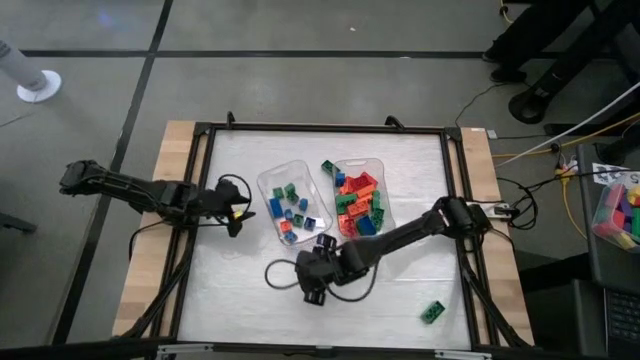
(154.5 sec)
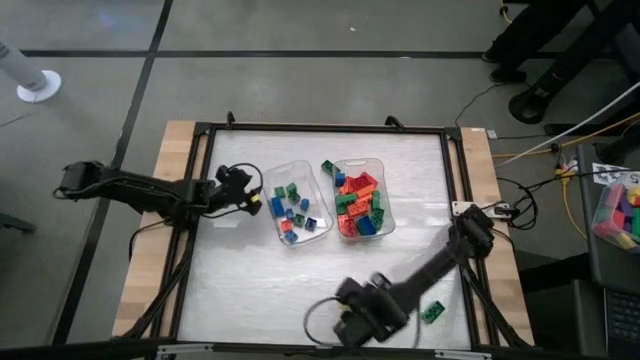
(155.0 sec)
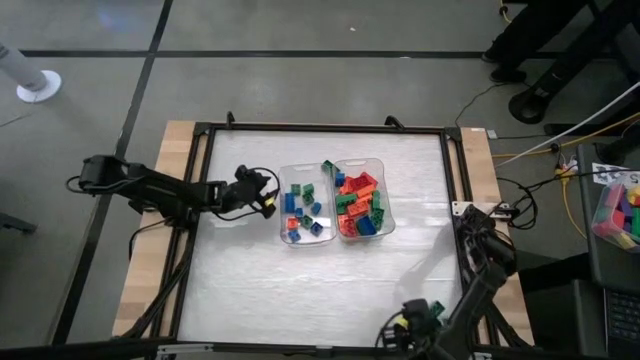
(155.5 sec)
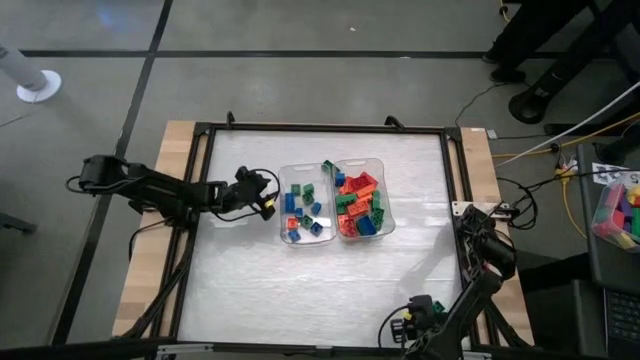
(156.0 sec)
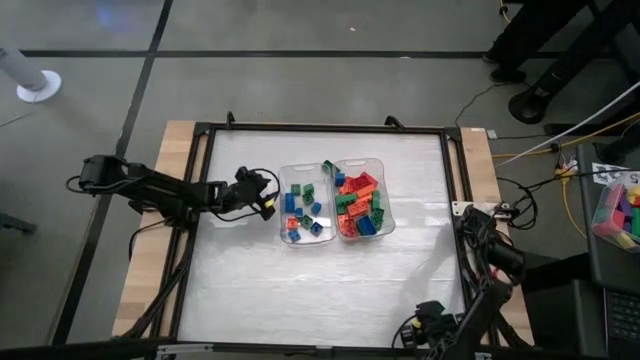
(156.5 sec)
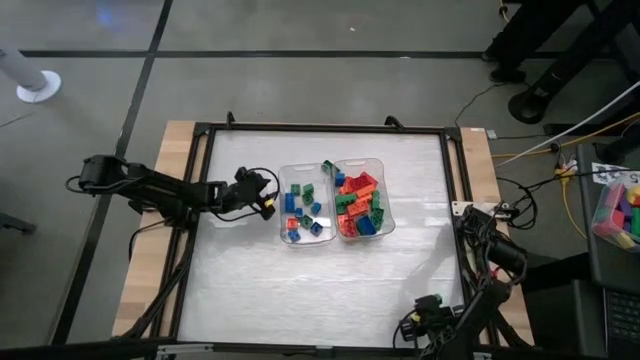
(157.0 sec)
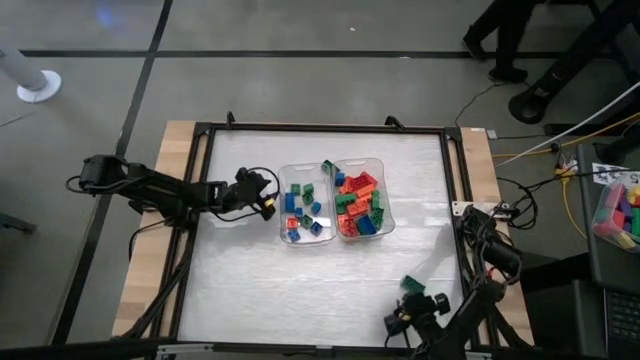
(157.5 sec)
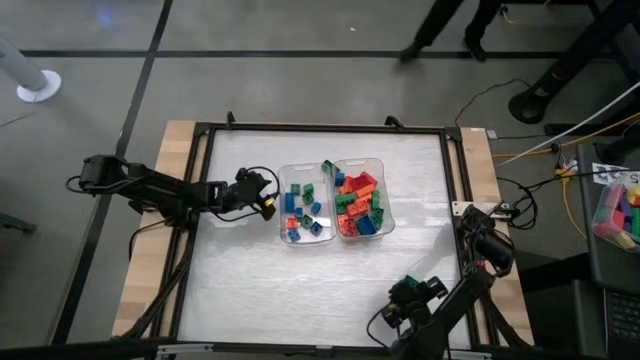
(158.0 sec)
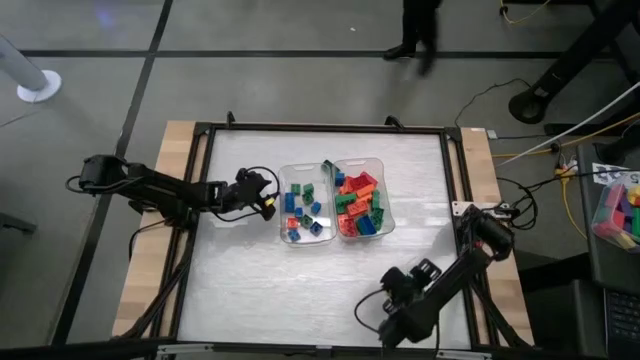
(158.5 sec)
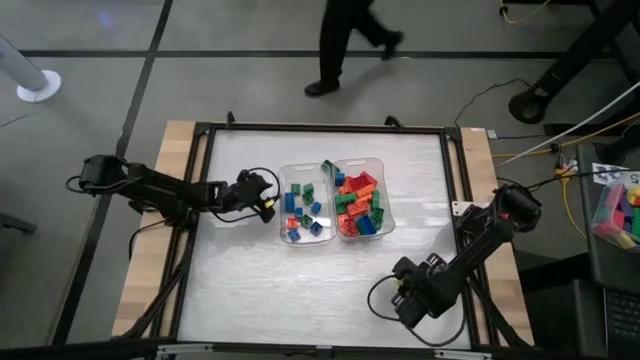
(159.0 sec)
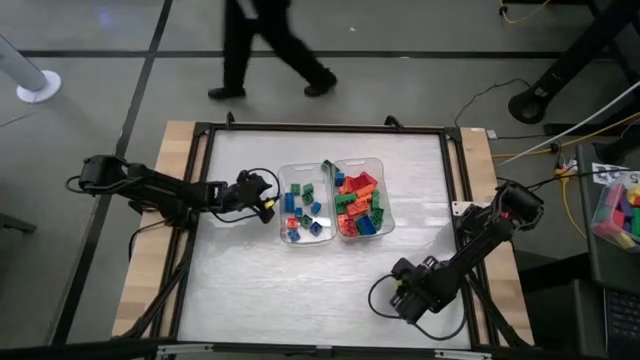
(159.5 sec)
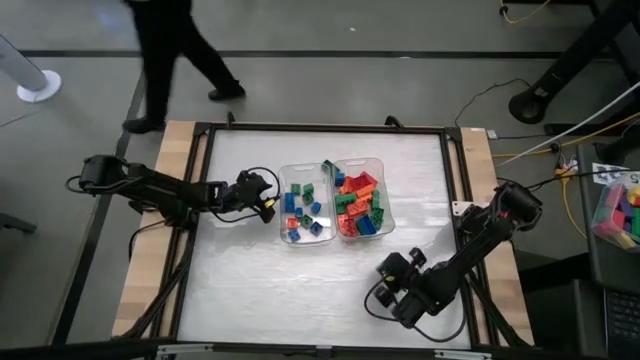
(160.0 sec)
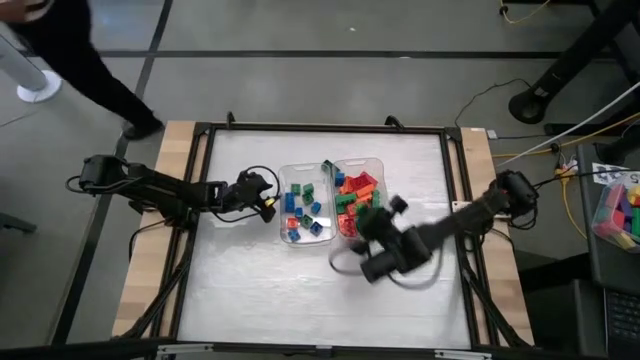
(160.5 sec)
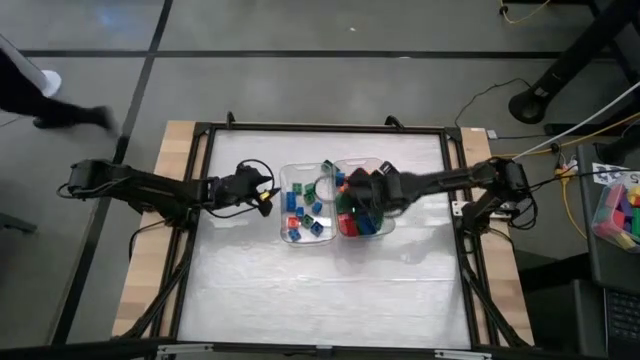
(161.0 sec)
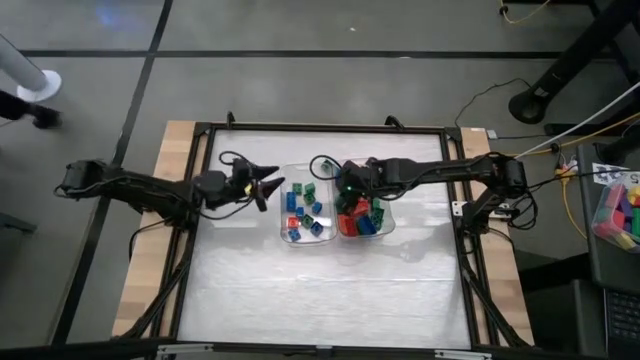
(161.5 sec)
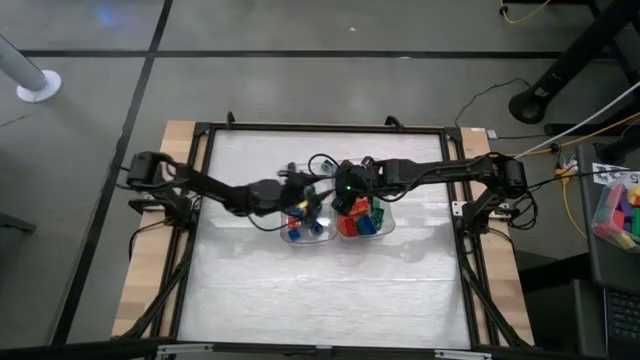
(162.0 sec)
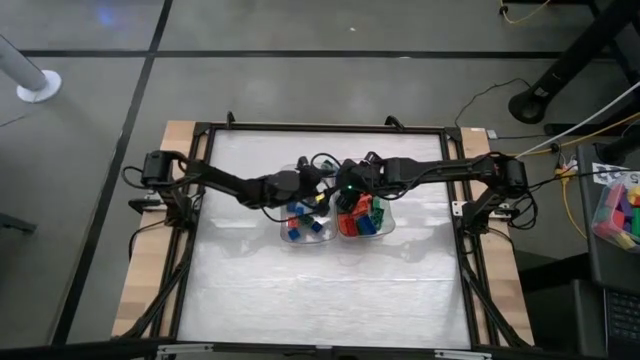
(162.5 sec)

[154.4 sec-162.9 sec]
Task: Sort blocks by size
Put the green rectangular game piece into the right transparent bin

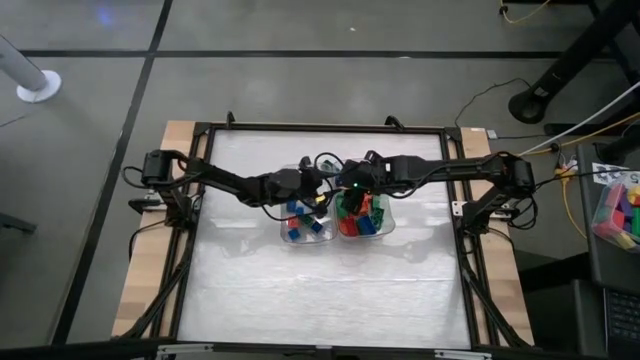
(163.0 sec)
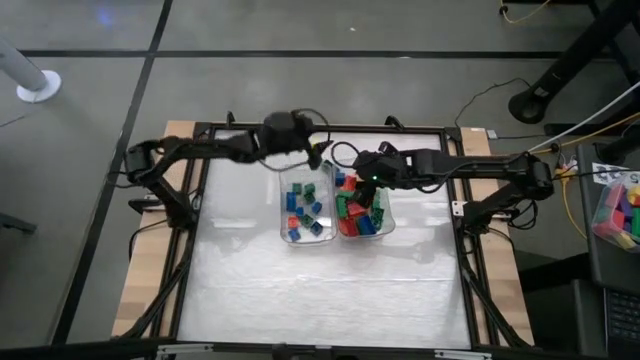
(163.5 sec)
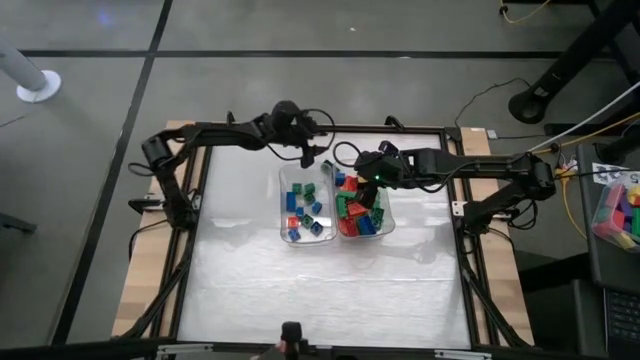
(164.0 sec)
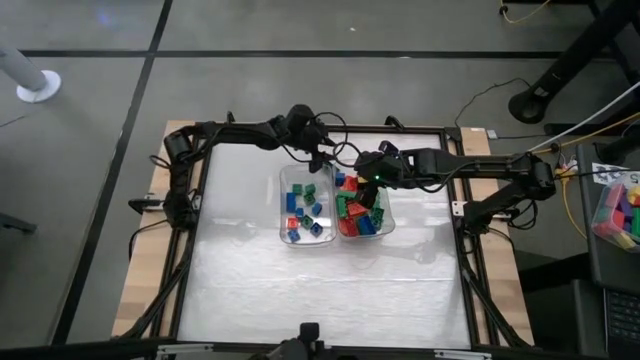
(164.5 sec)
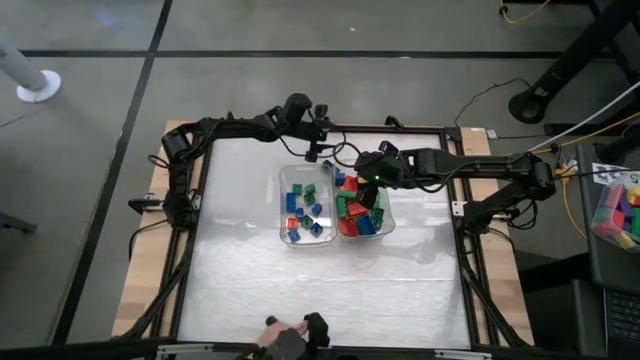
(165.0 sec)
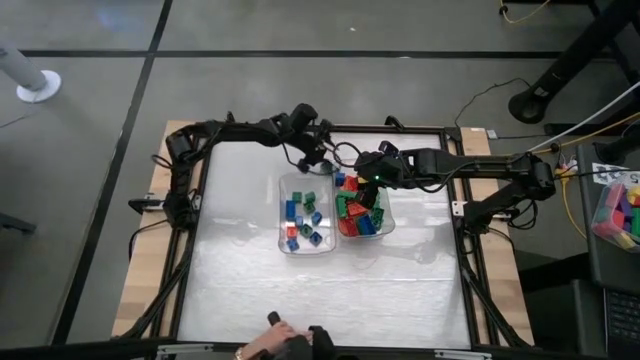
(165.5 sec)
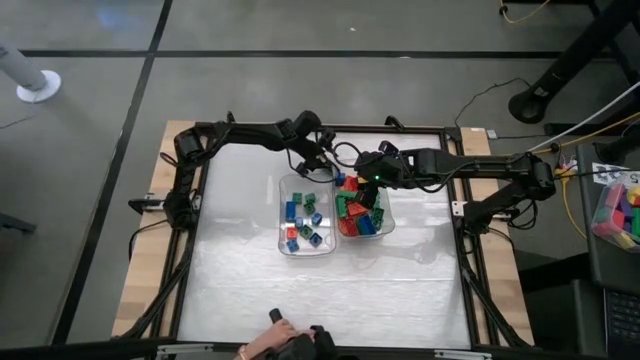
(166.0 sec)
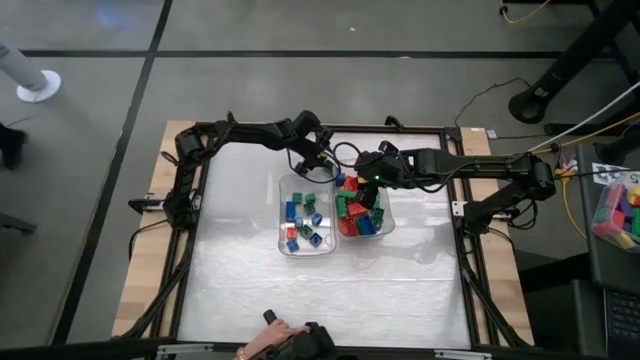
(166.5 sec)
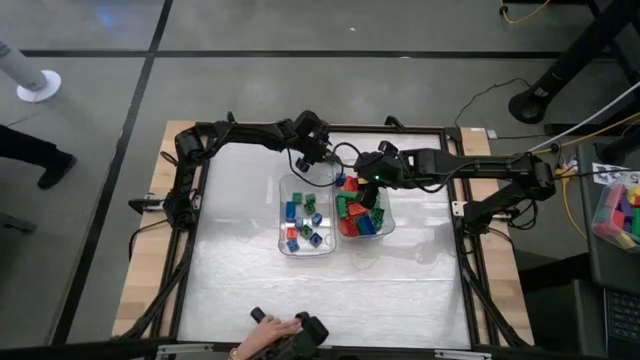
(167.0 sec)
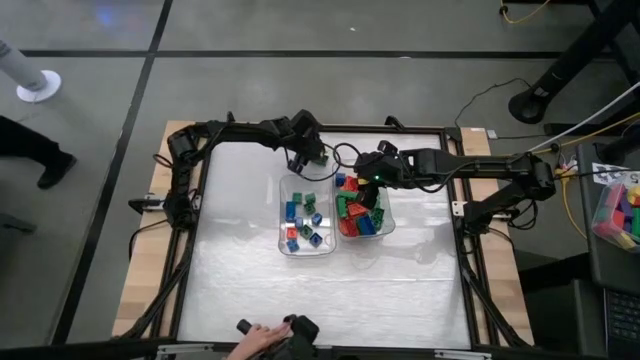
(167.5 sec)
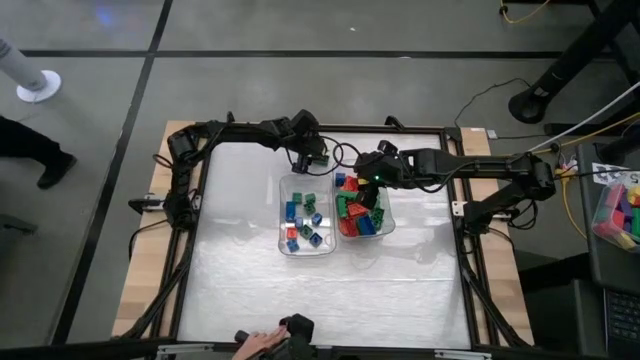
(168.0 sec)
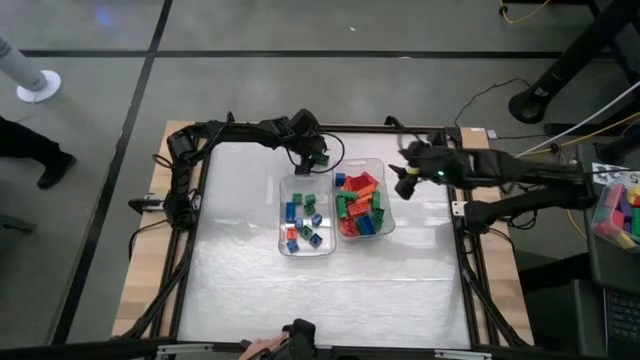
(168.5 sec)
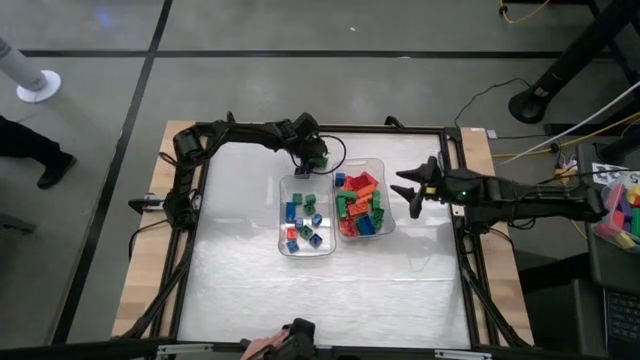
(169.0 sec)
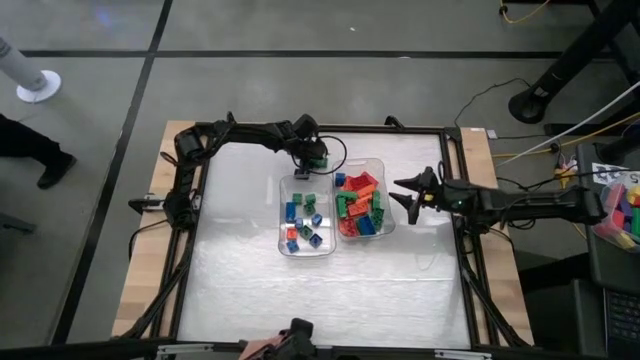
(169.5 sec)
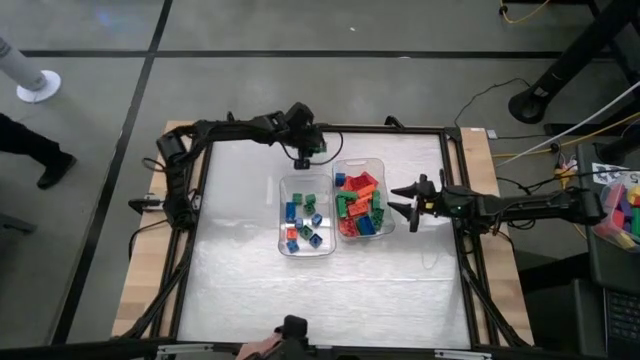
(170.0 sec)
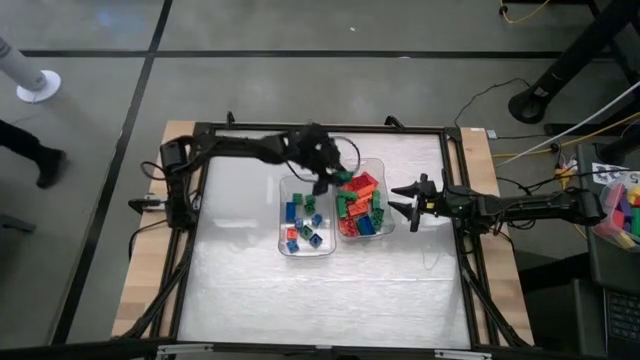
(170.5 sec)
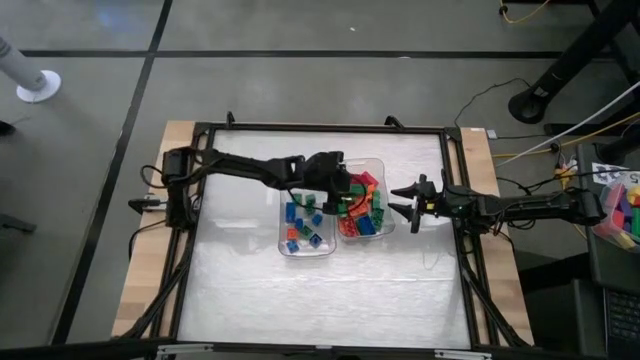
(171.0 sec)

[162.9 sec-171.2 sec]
Put the green rectangular game piece into the right transparent bin

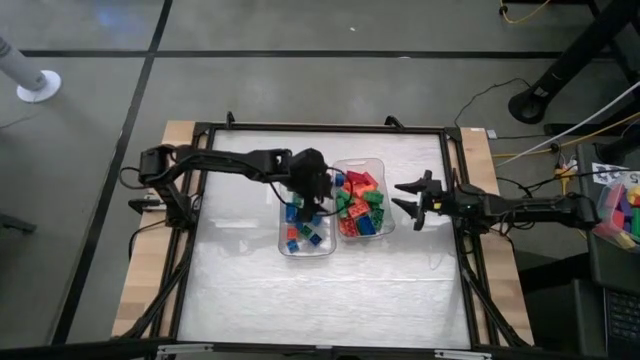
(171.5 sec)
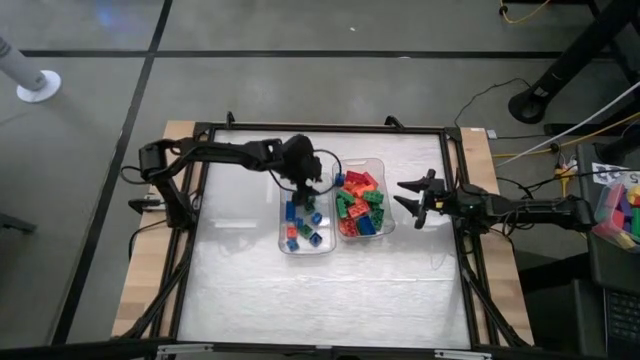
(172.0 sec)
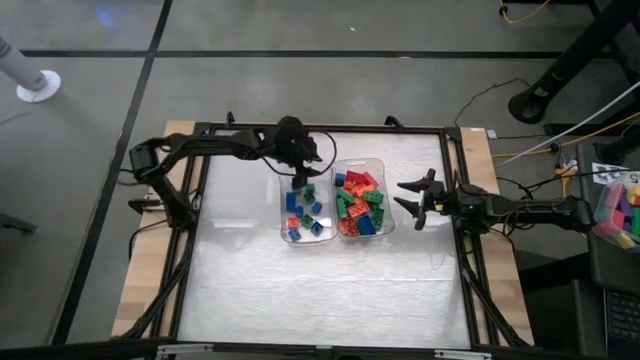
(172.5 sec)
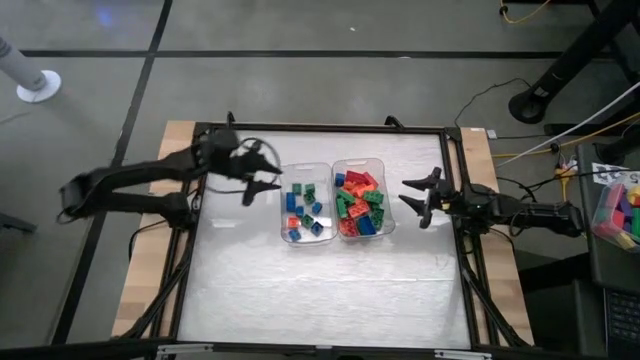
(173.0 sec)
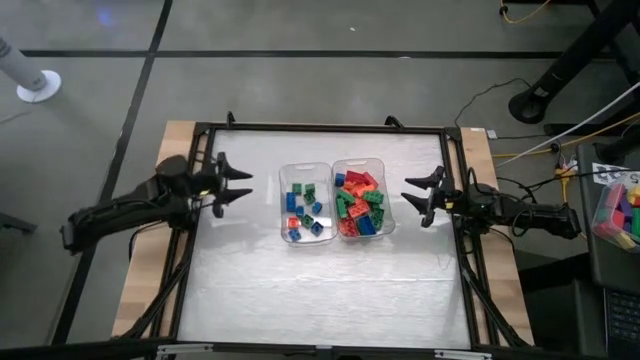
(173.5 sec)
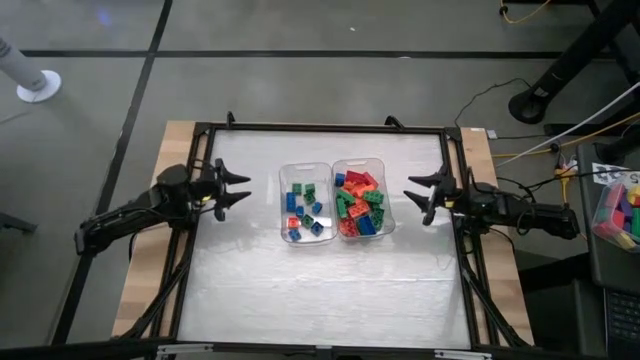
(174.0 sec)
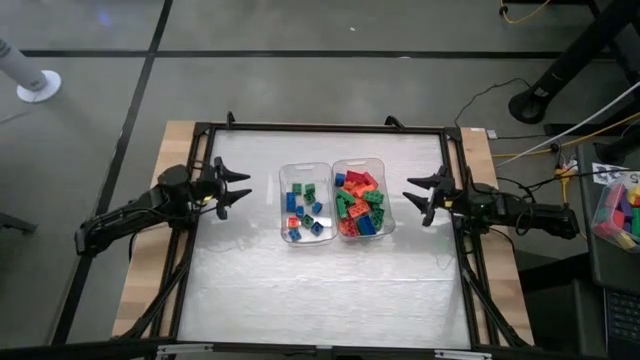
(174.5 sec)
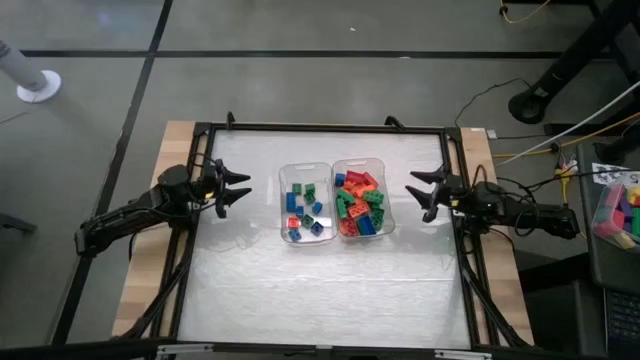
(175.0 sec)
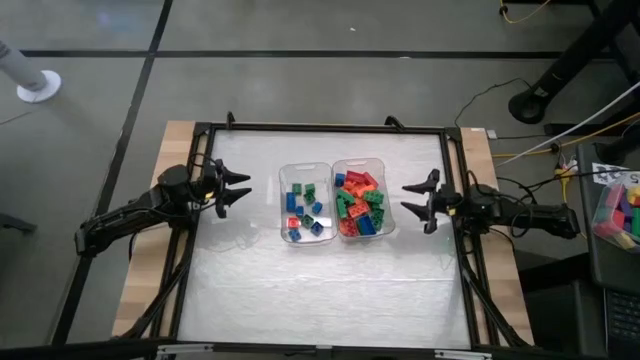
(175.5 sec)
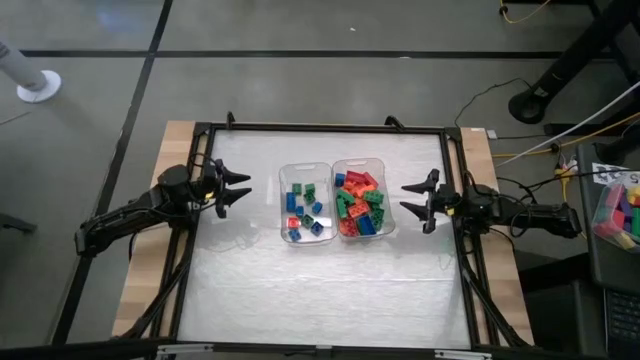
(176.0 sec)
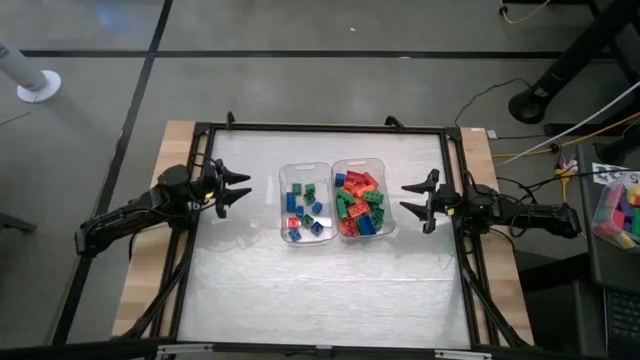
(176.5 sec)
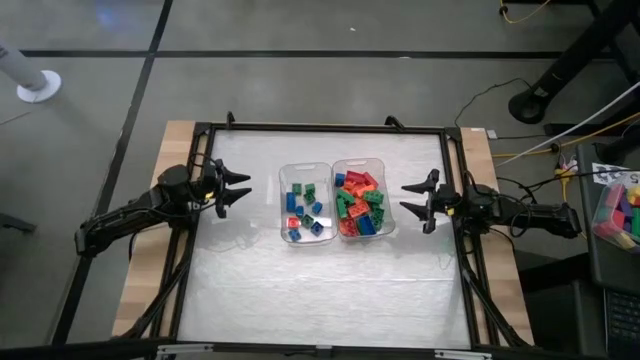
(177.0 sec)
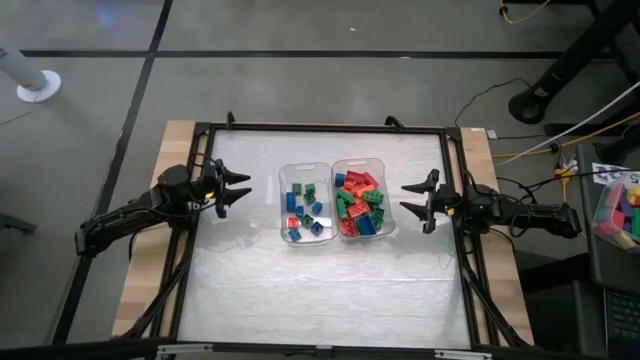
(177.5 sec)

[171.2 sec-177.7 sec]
Return to Home Position
